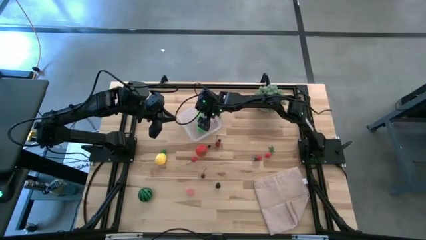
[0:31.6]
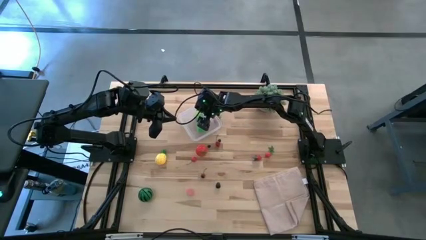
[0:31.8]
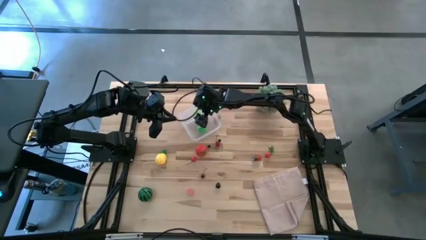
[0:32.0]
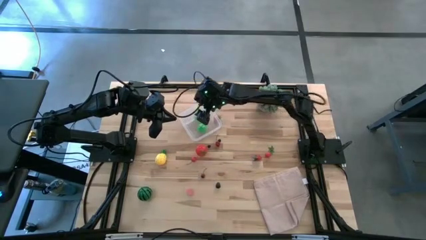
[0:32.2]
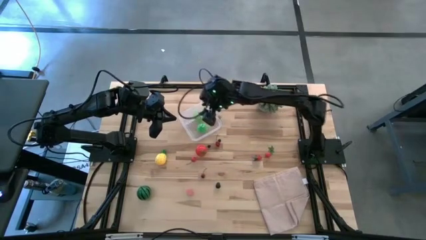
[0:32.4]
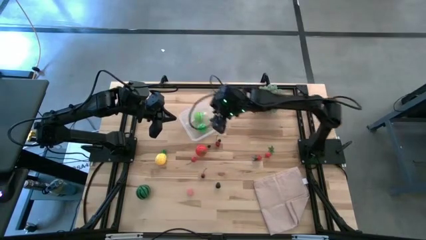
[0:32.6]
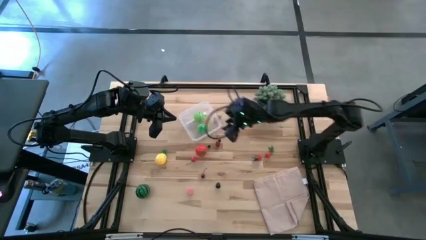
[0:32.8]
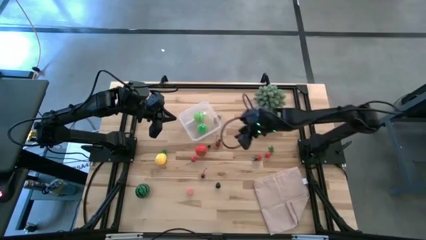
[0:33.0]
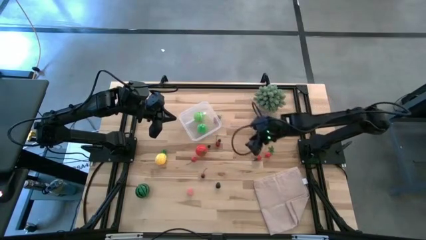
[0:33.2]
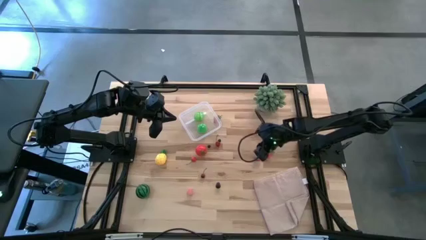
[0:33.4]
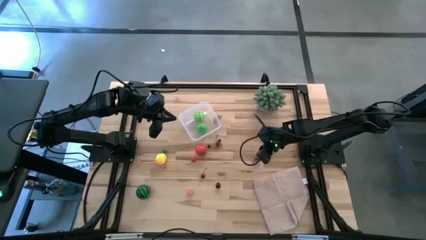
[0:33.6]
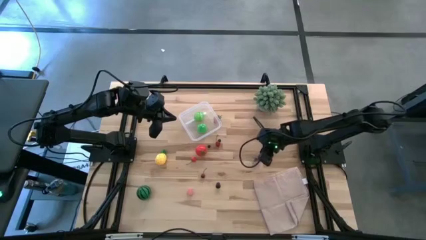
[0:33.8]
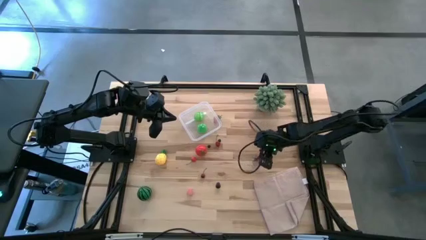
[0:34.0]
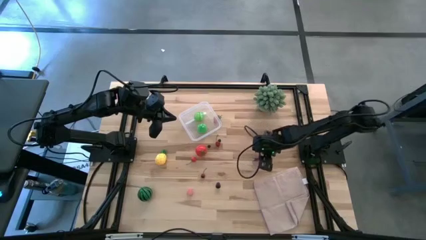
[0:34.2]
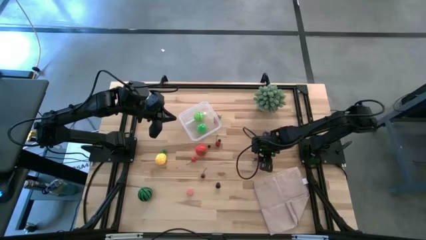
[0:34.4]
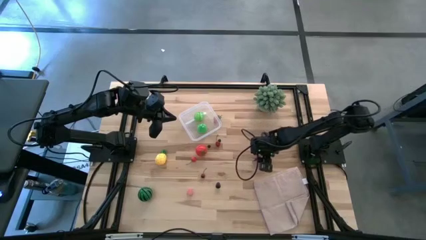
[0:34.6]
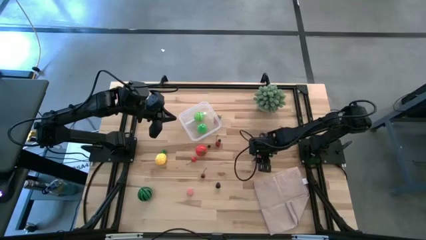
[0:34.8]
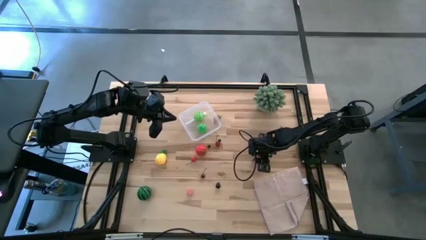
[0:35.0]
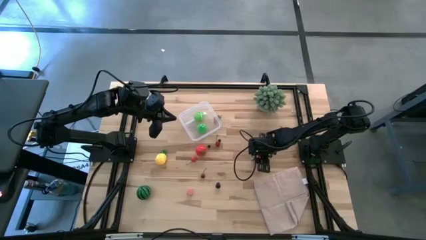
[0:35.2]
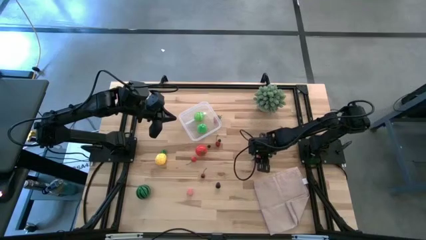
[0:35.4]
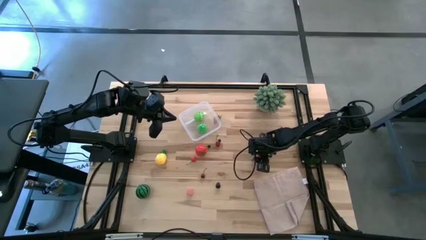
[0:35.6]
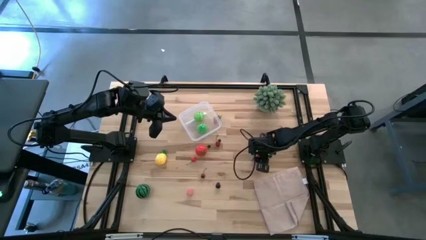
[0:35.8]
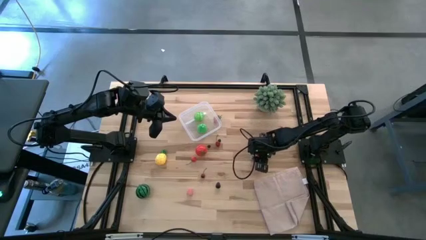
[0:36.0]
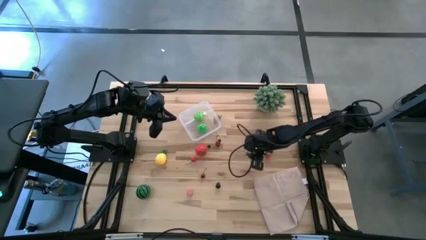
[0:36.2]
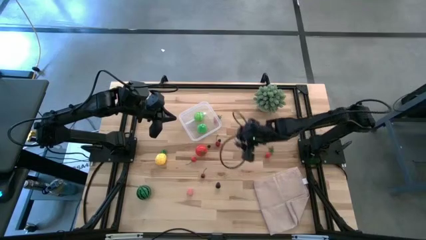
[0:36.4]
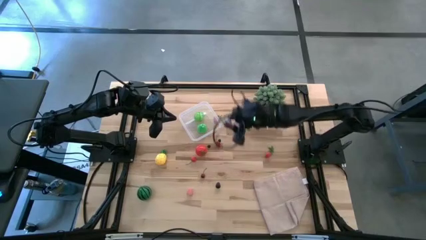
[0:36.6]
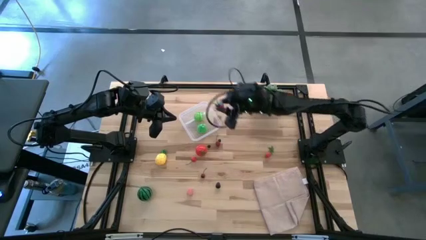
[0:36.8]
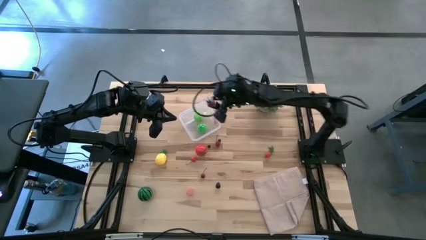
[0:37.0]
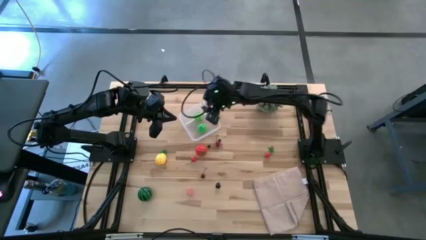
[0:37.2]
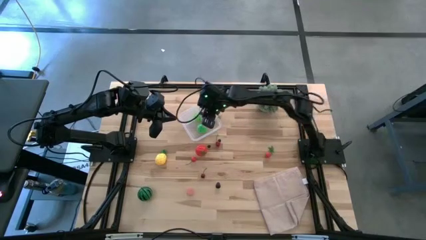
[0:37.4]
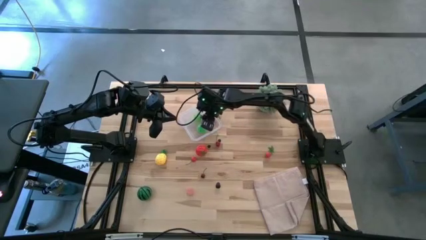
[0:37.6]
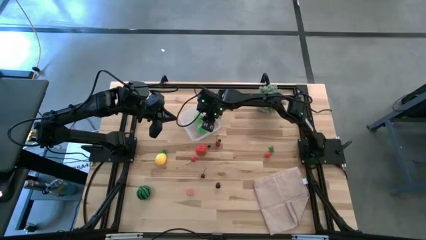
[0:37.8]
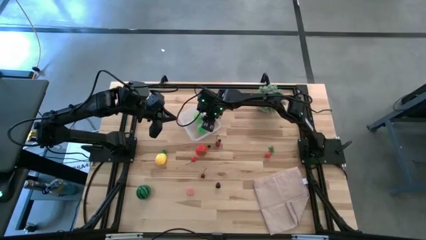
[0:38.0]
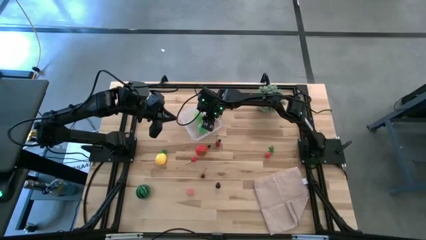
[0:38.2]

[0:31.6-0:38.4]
Task: Pick and placing Produce into tupperware
Put the bottom red strawberry into the transparent bin

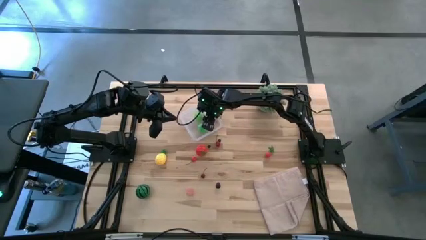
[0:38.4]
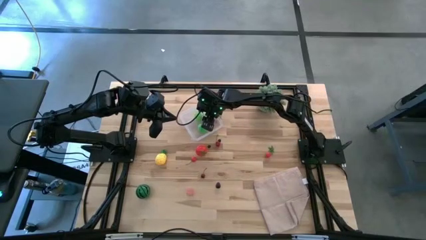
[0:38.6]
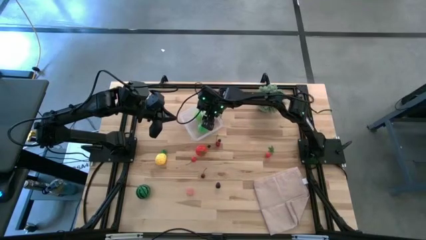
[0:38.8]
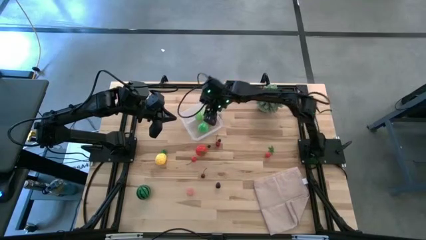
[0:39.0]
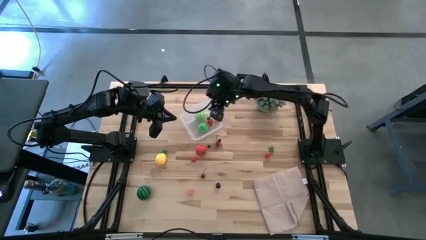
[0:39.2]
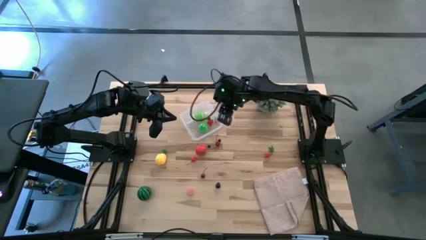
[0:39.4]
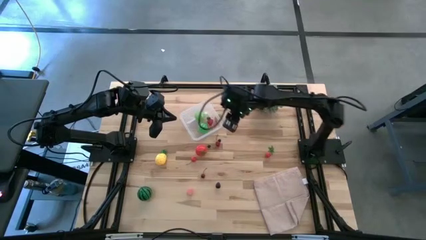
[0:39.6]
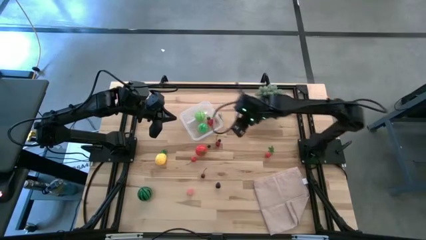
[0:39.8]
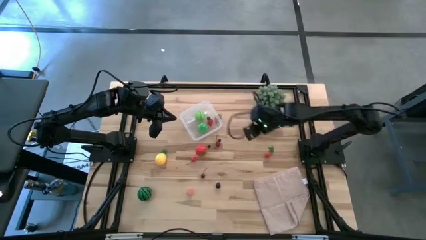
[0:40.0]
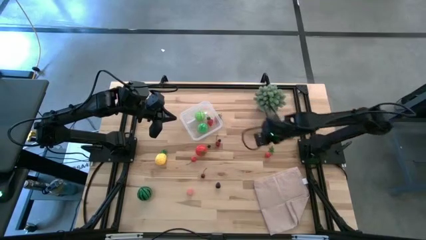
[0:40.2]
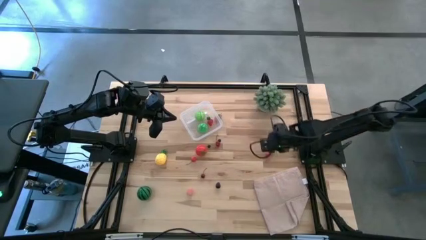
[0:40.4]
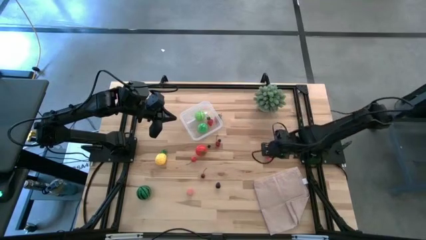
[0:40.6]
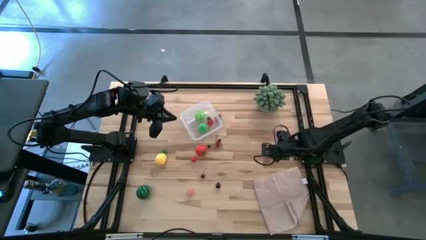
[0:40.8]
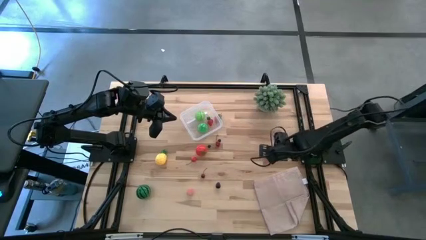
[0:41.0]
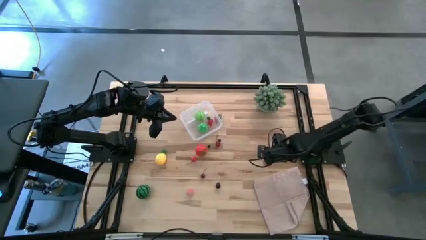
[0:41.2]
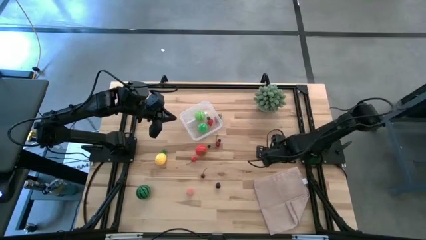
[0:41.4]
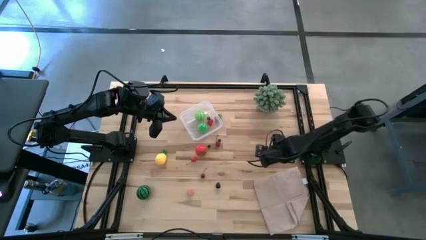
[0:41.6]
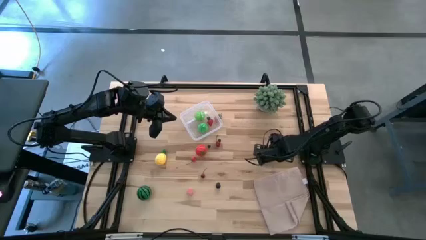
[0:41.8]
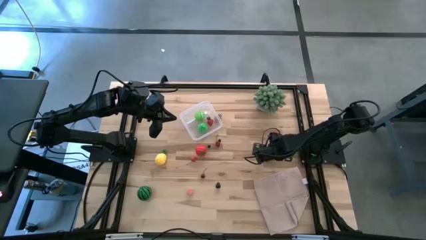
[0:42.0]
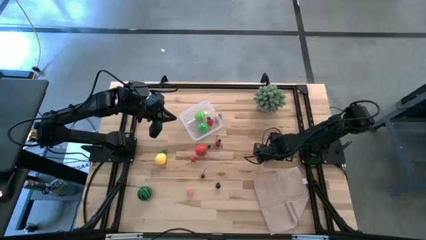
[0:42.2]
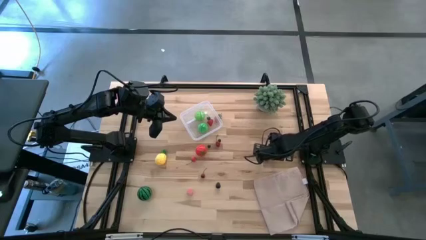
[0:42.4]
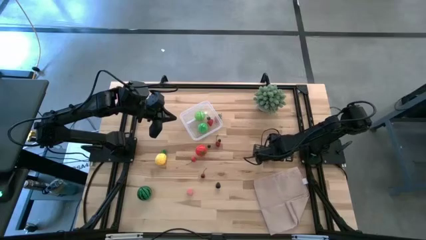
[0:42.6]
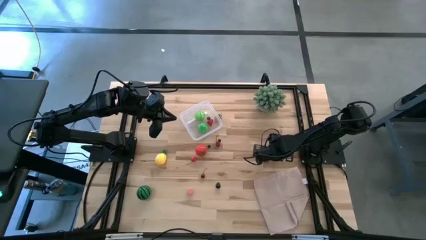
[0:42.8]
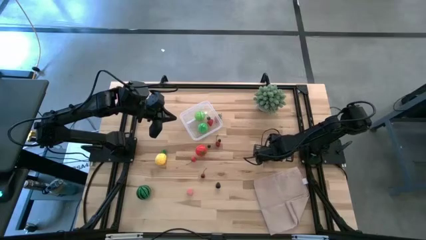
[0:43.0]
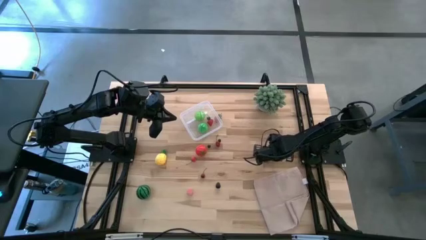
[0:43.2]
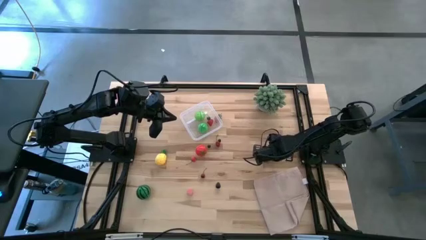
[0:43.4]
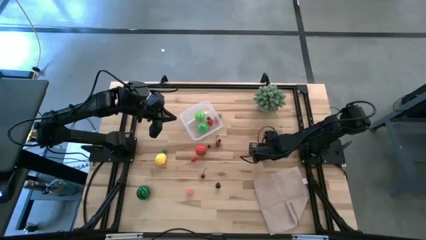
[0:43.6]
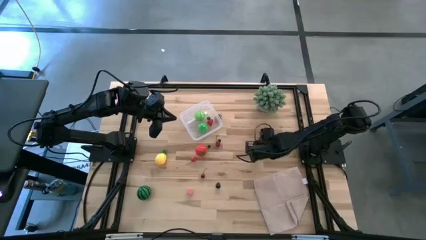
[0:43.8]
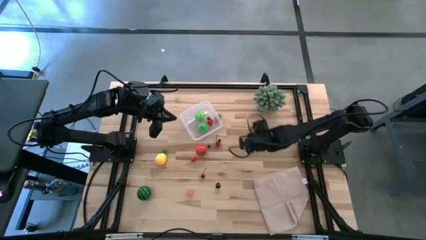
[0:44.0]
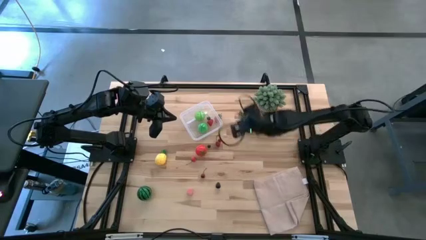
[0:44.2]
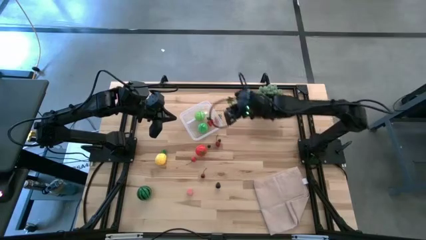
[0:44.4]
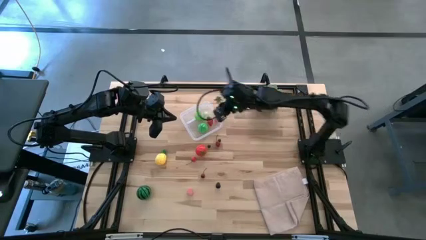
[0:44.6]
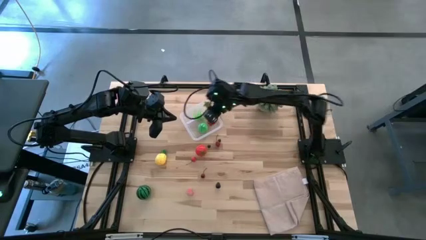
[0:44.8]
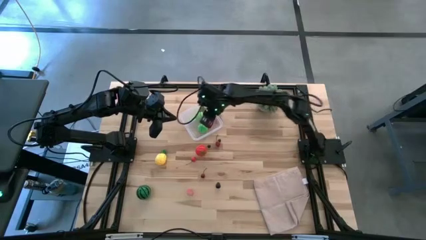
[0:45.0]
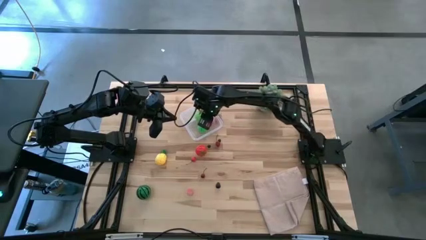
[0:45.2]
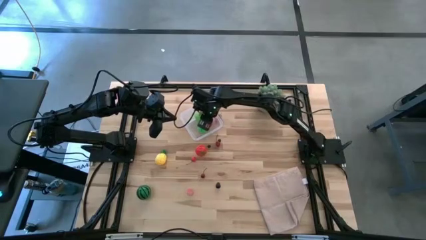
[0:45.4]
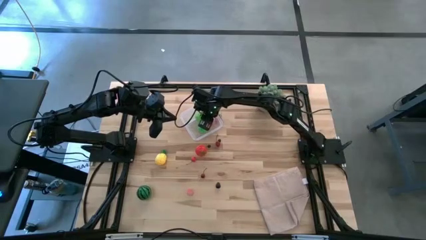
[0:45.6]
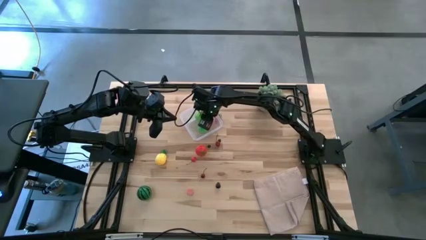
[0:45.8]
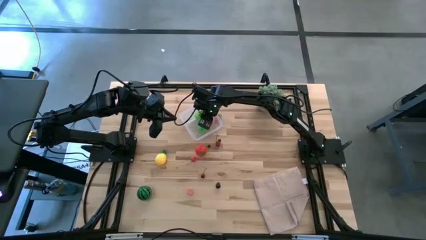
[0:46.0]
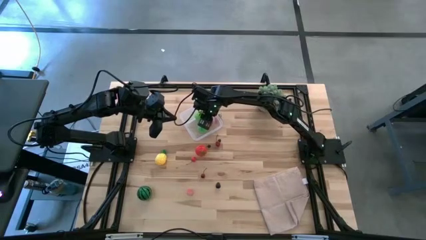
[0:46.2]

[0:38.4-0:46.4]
Put the right red tomato into the transparent bin

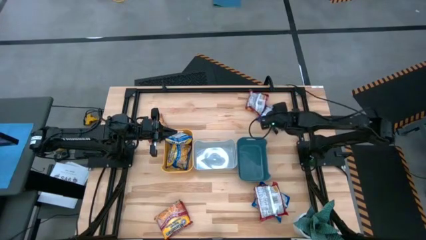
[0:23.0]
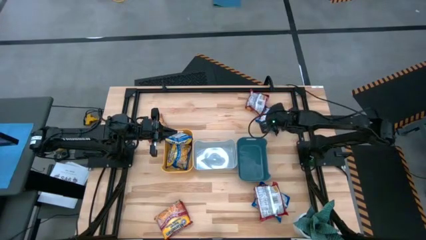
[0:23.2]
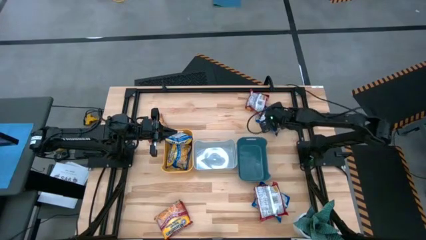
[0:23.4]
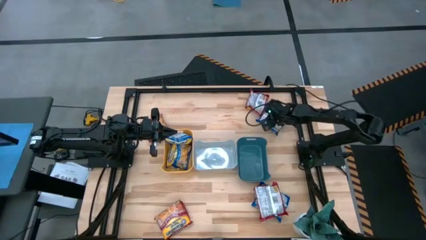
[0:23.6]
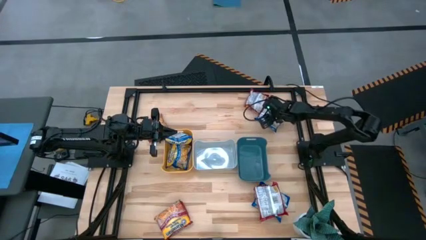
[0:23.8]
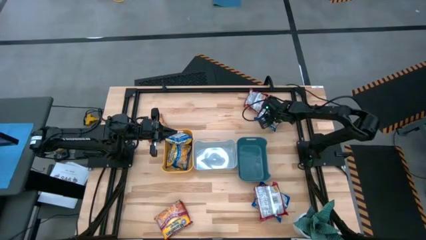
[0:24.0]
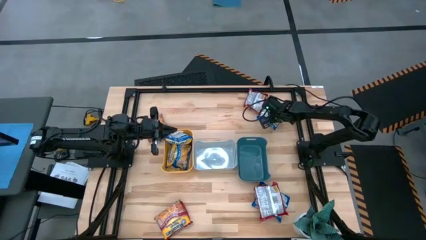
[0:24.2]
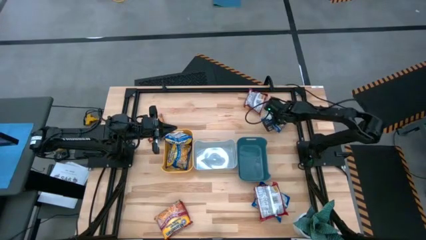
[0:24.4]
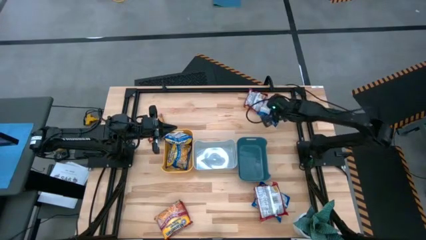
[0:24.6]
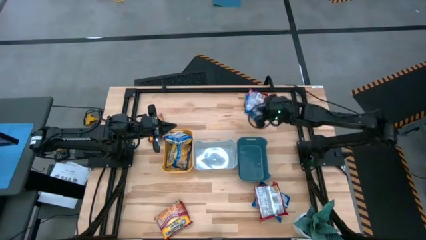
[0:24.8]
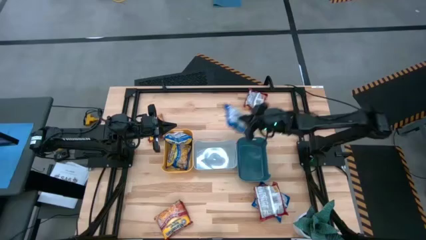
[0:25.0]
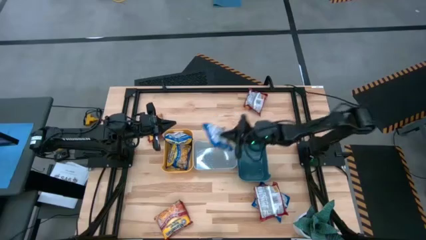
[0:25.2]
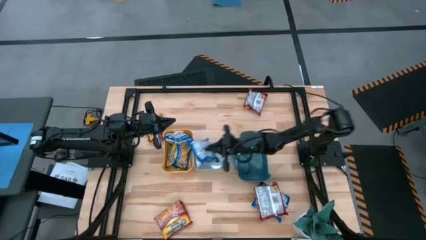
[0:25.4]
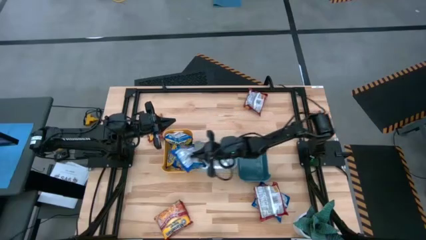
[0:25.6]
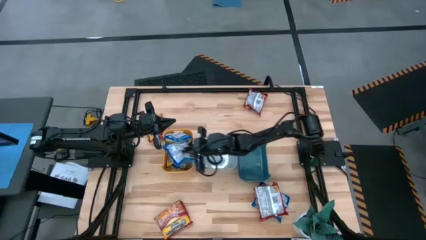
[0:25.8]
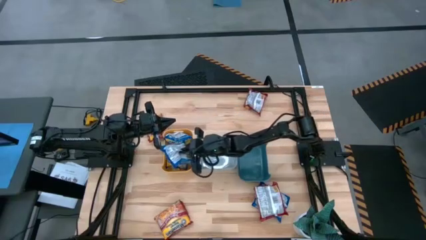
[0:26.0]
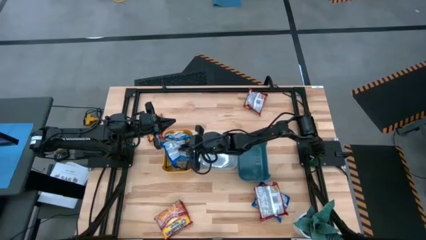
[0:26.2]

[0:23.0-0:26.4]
Task: Sort Maruchan noodles
Put the top blue noodle pack into the yellow bin
